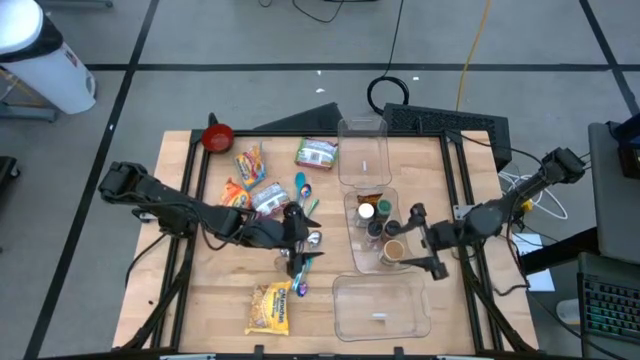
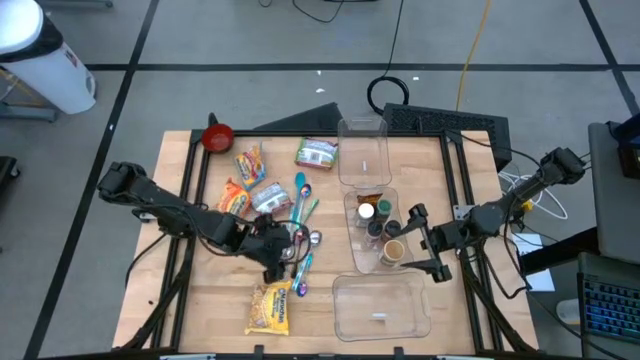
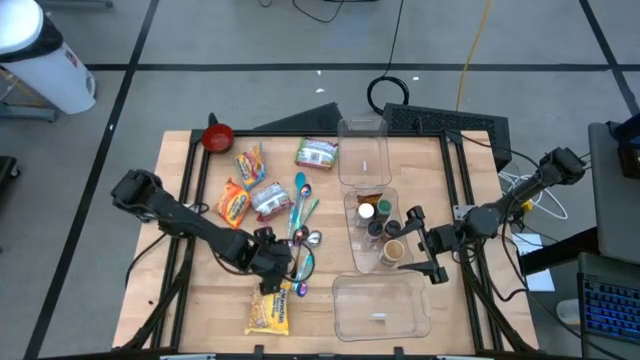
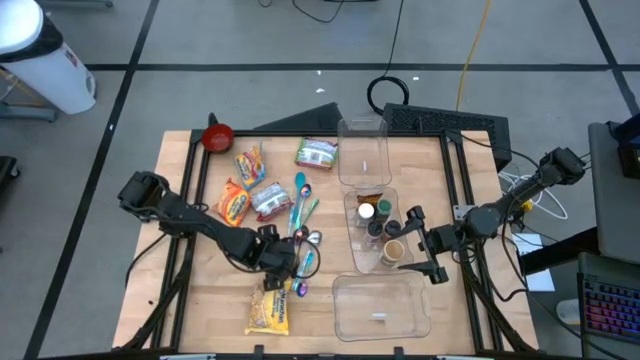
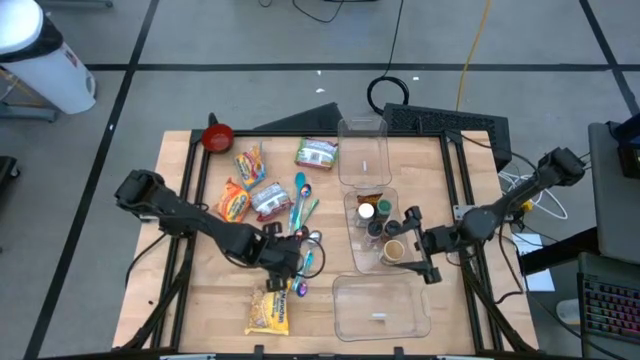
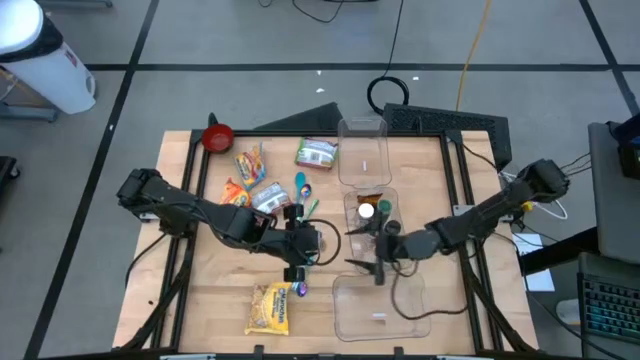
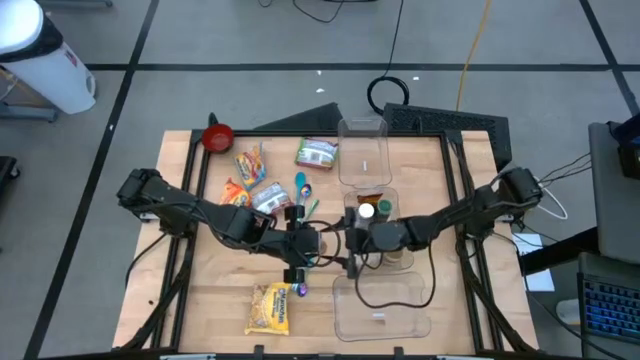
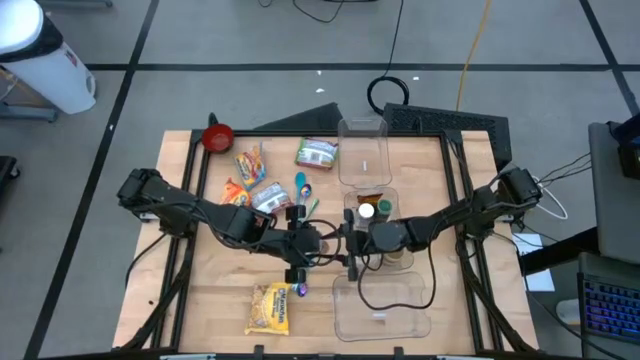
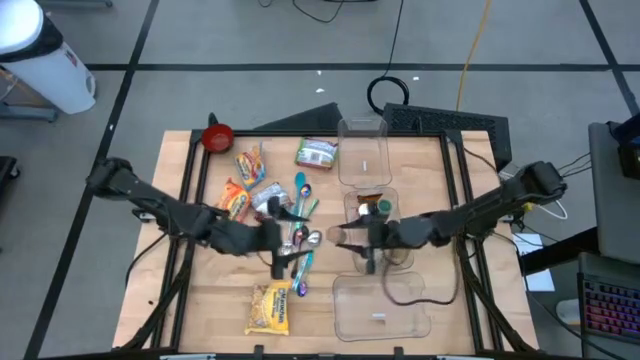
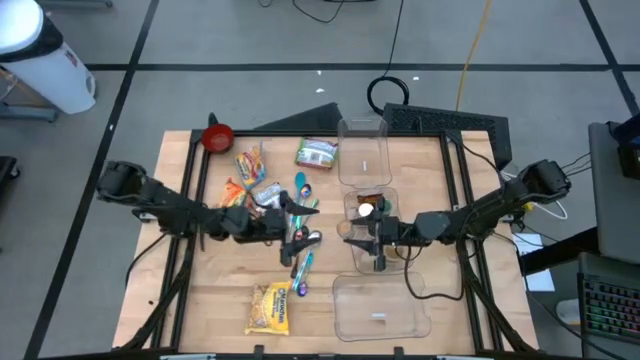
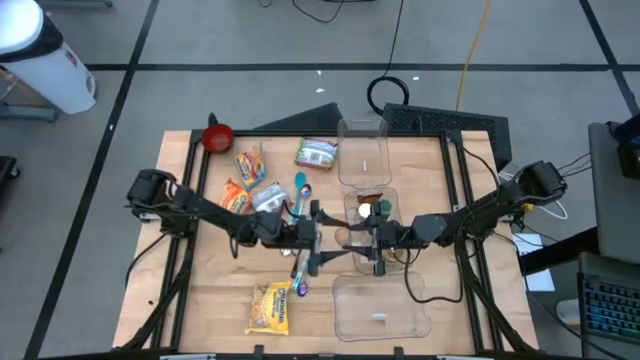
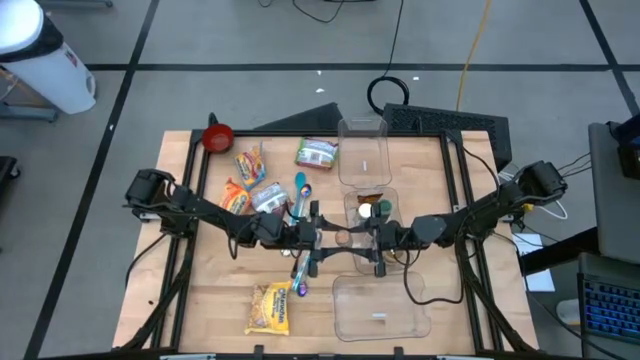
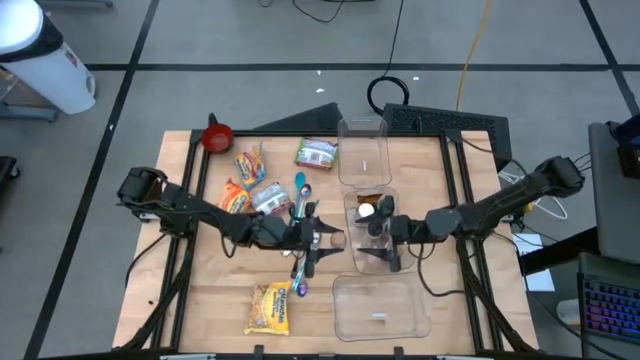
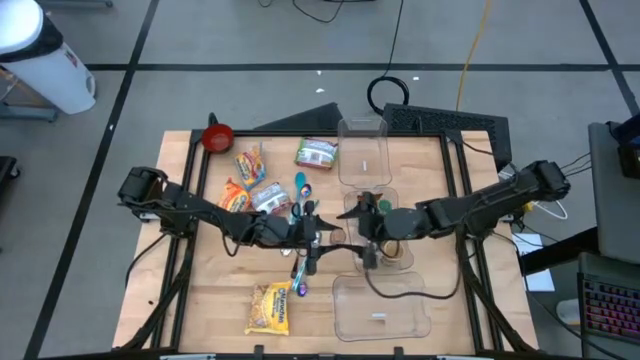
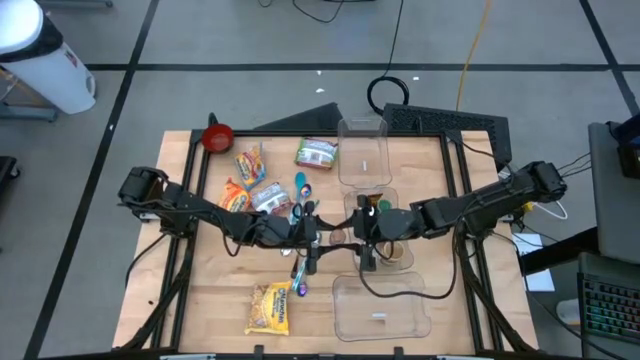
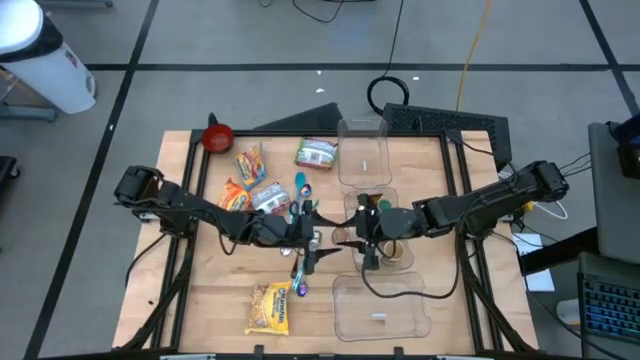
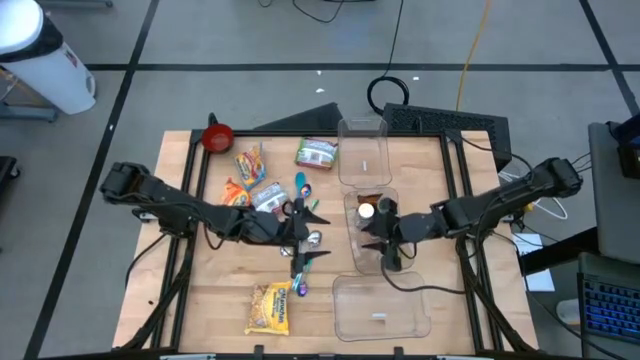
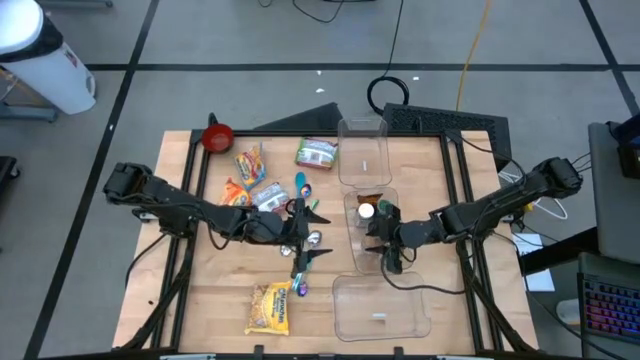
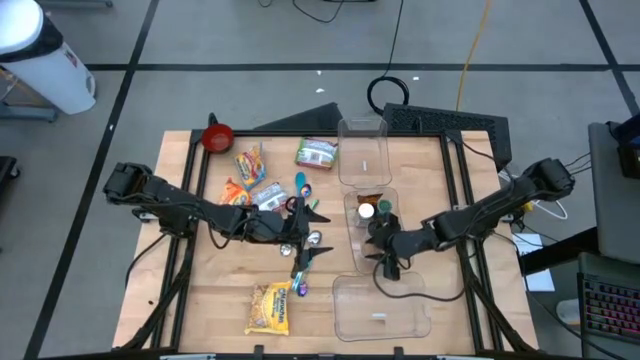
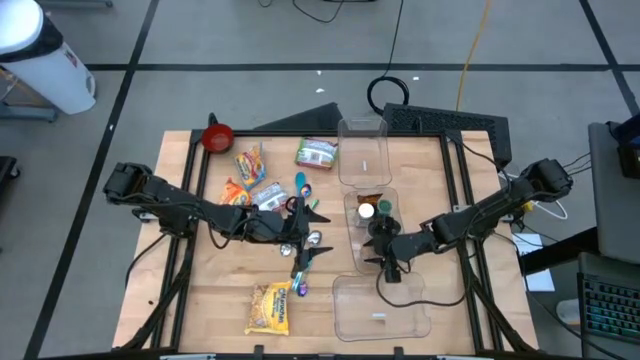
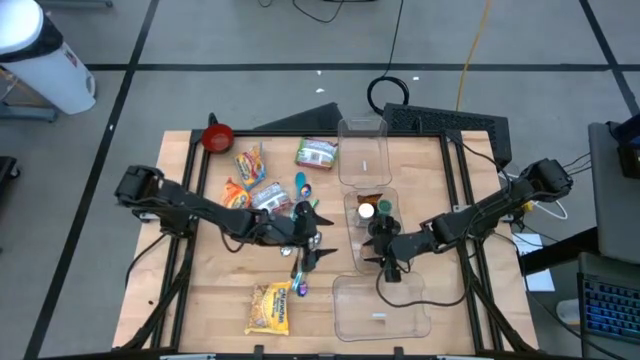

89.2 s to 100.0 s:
Task: Pick & Place Food Item
Put the yellow seasoning bottle into the middle transparent bin

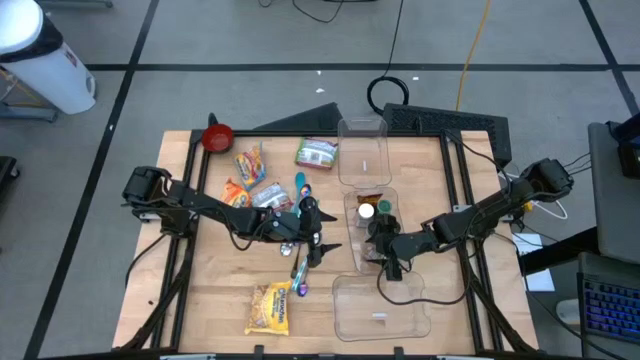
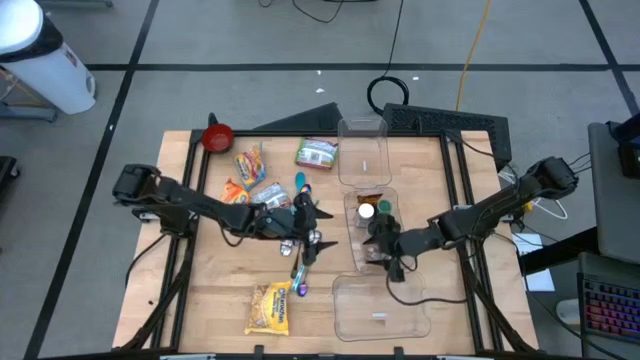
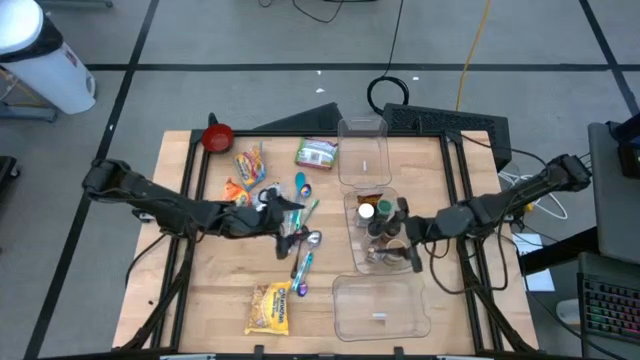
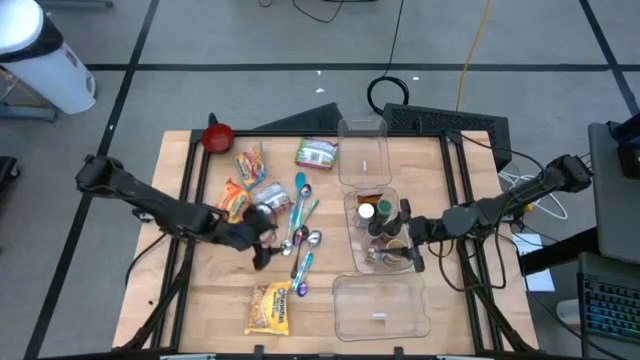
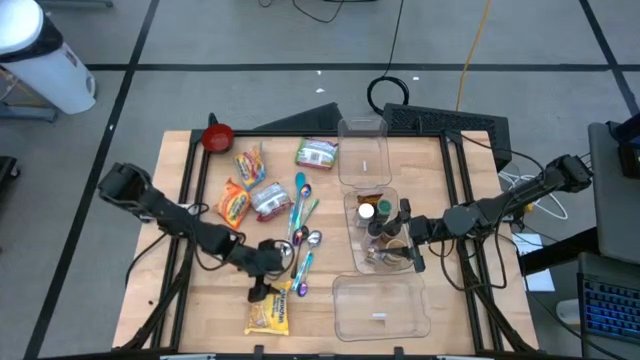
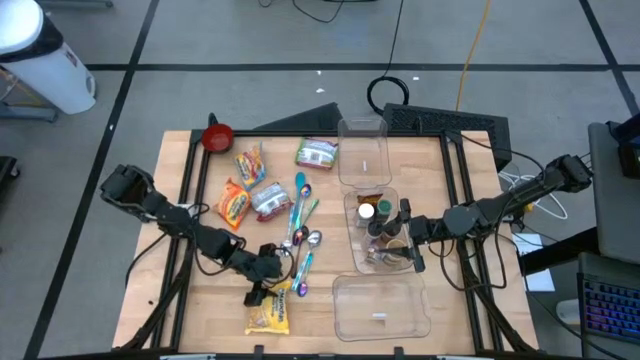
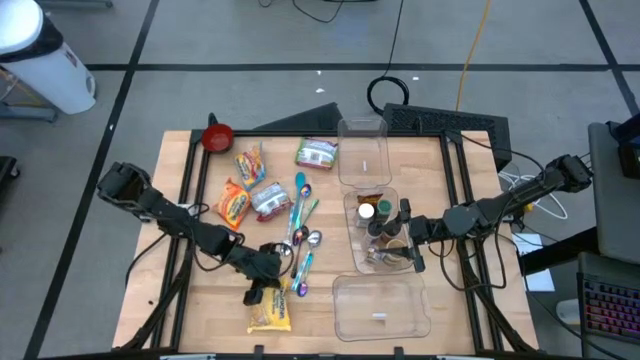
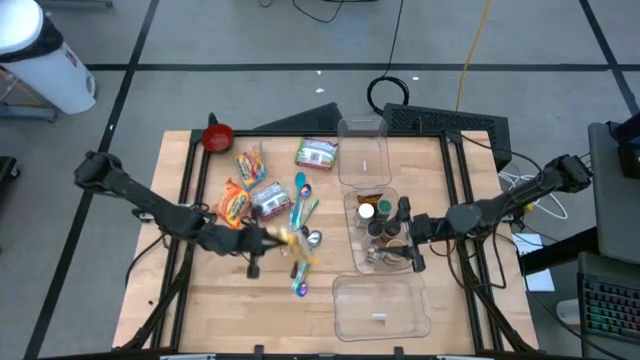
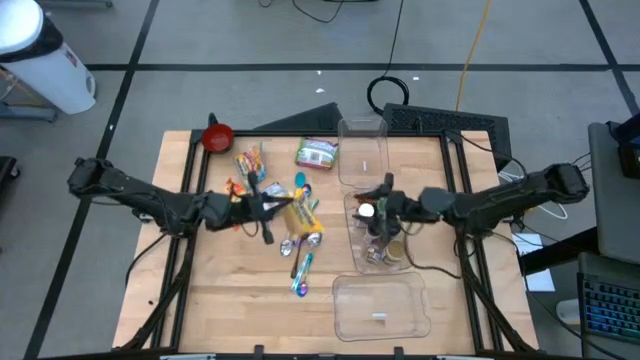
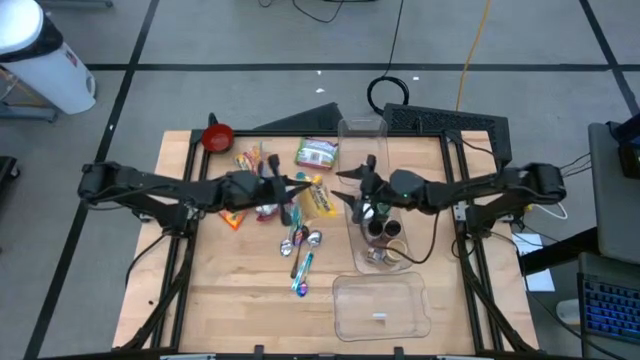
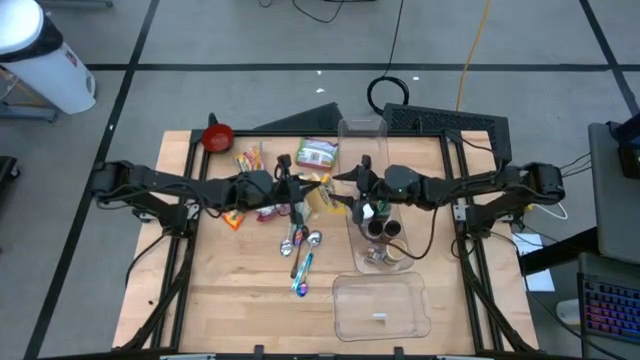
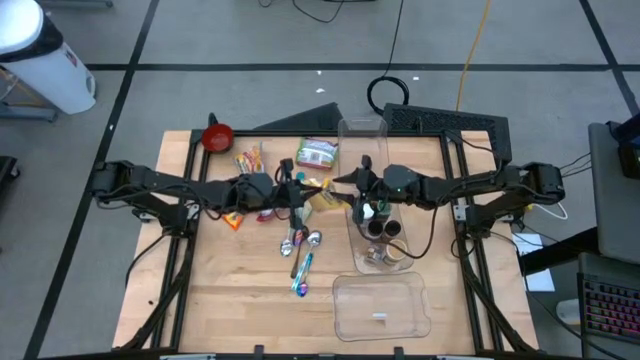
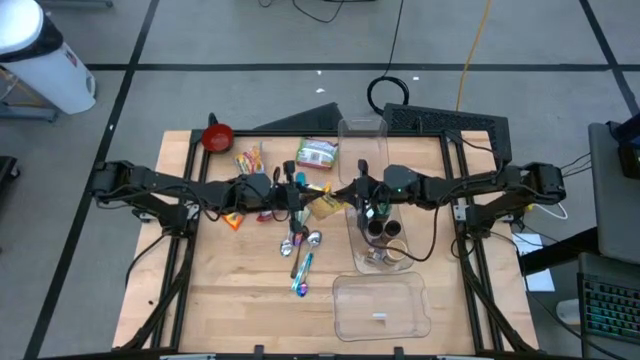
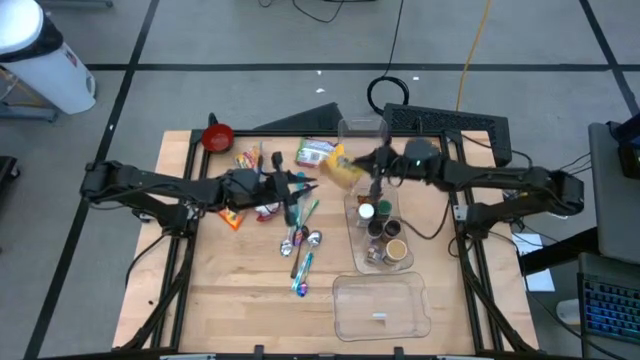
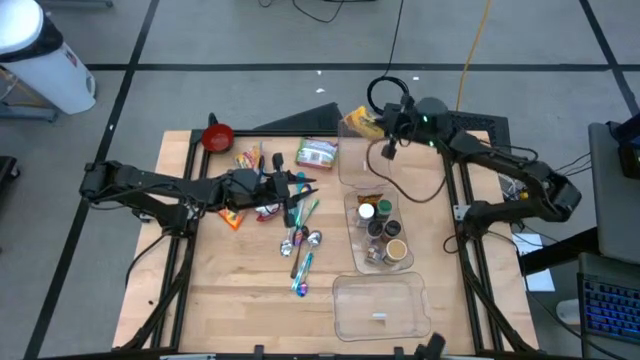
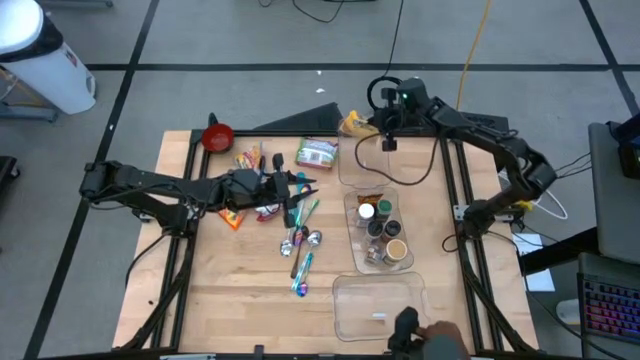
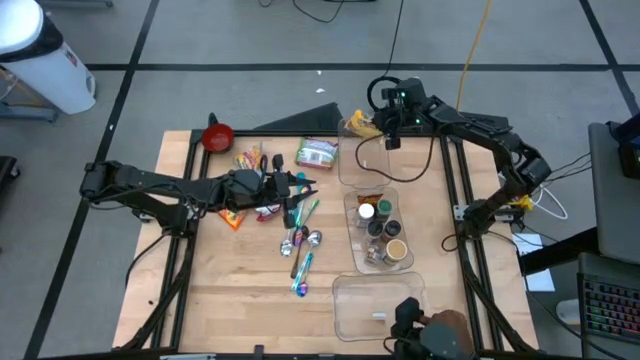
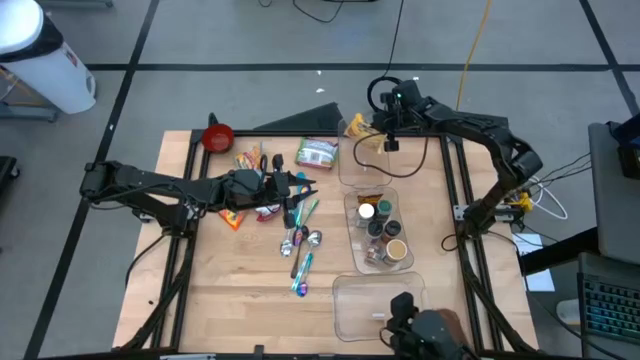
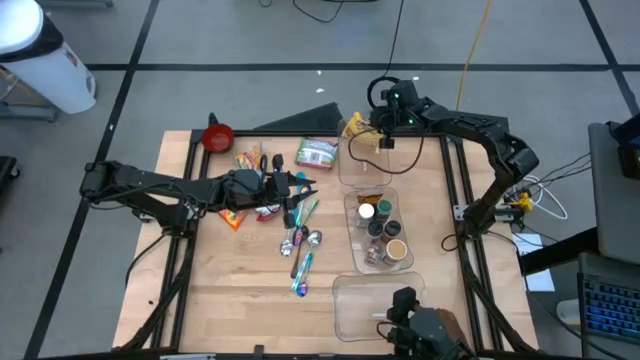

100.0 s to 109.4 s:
Put the yellow noodle pack into the top transparent bin

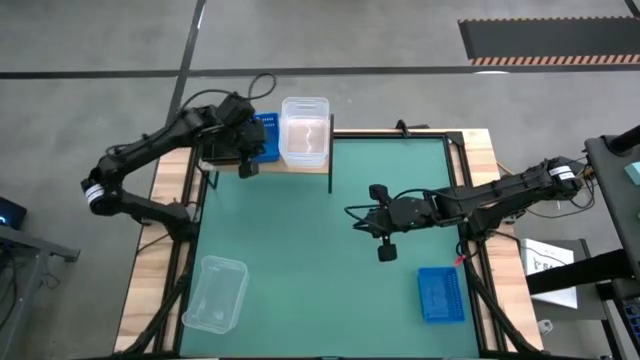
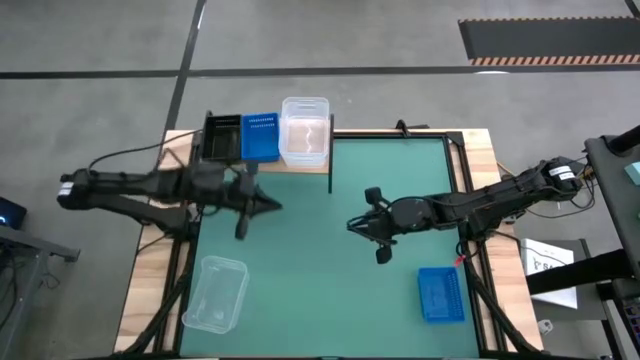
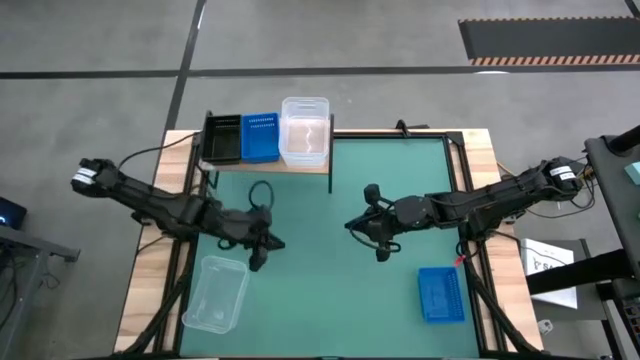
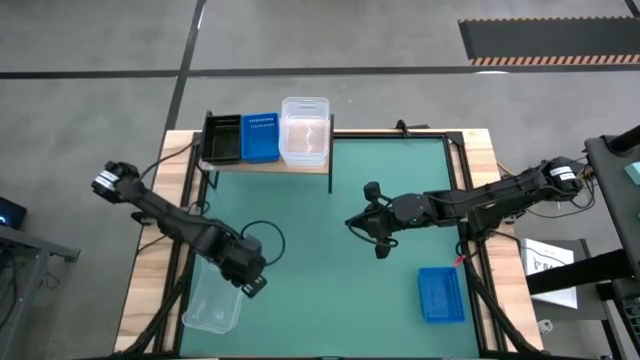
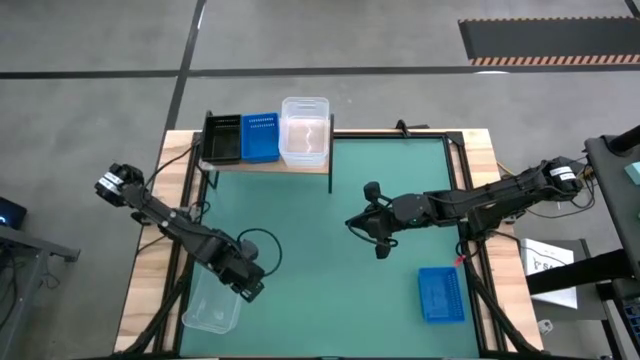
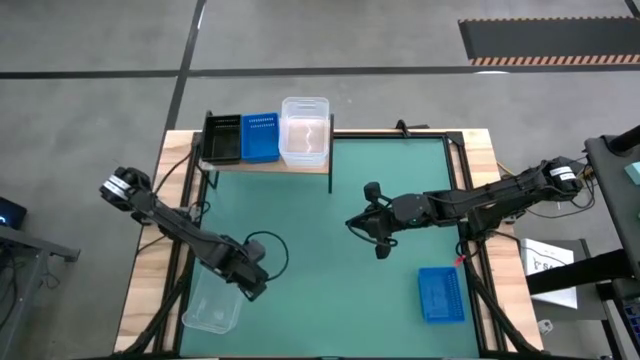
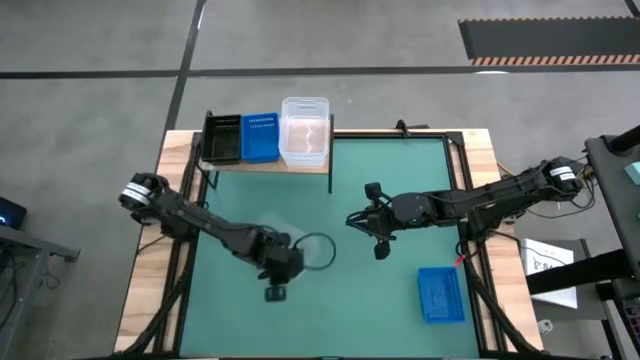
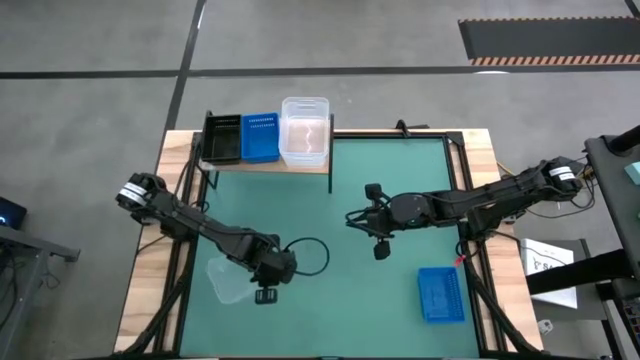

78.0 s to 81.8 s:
Task: Stack baskets on shelf by color
Stack the transparent bin on top of the transparent bin on the shelf
